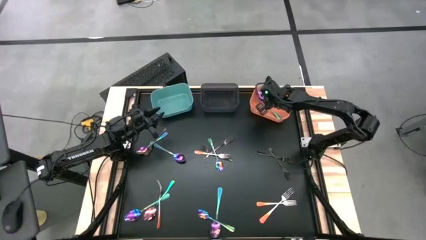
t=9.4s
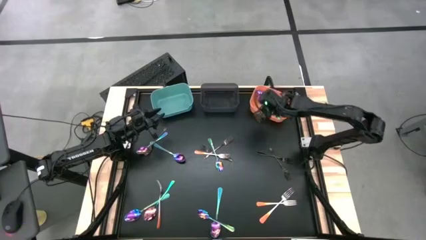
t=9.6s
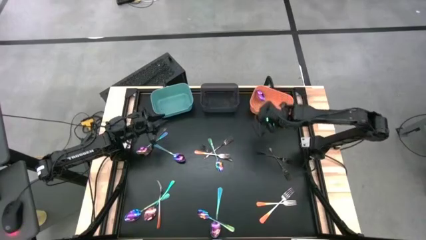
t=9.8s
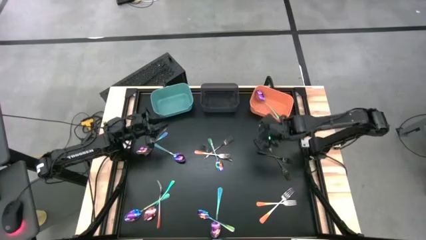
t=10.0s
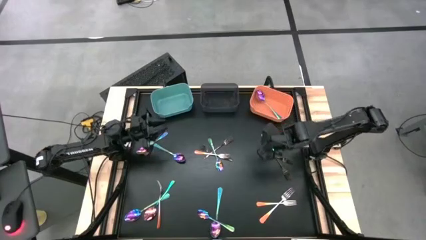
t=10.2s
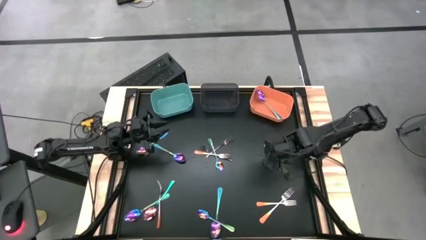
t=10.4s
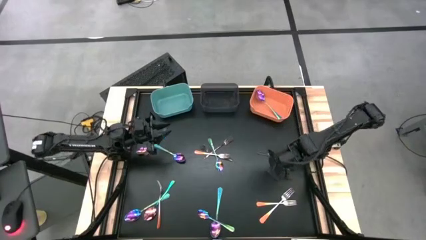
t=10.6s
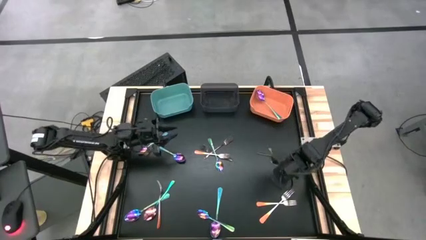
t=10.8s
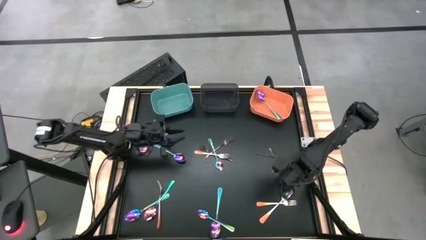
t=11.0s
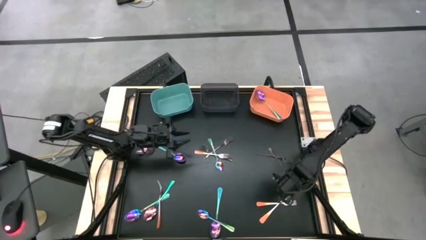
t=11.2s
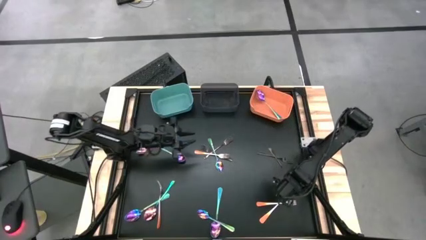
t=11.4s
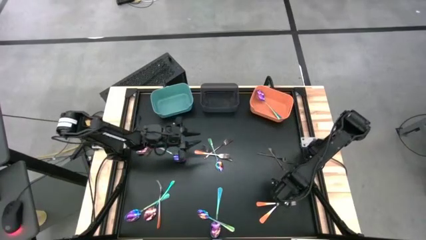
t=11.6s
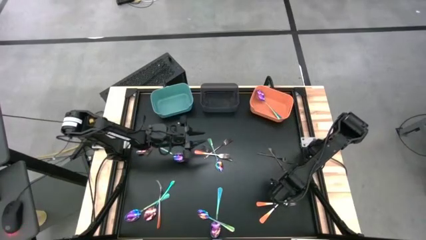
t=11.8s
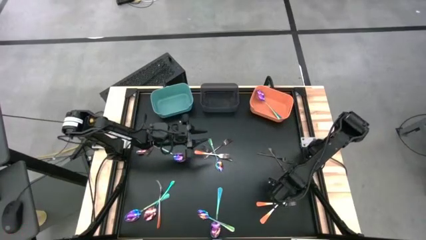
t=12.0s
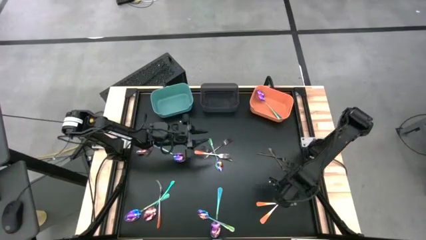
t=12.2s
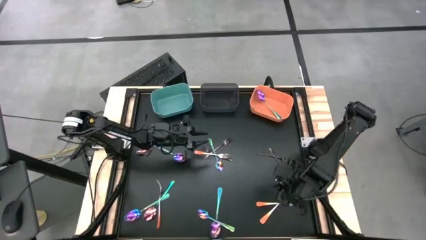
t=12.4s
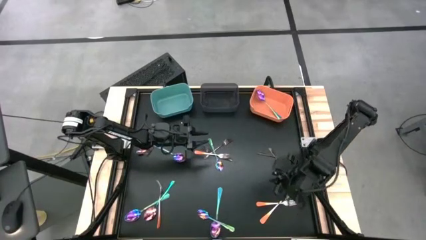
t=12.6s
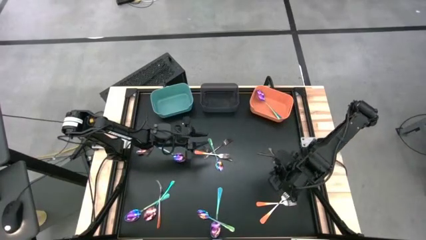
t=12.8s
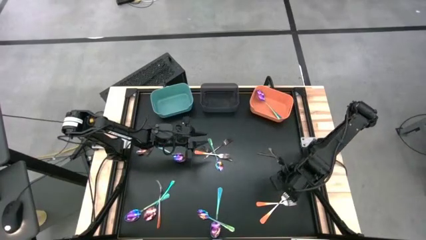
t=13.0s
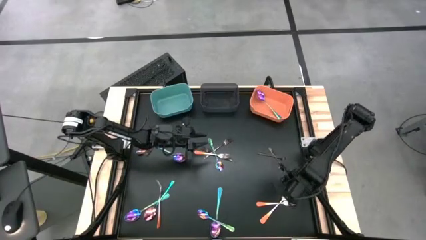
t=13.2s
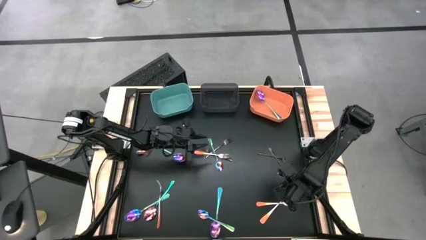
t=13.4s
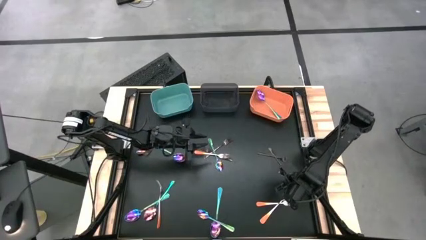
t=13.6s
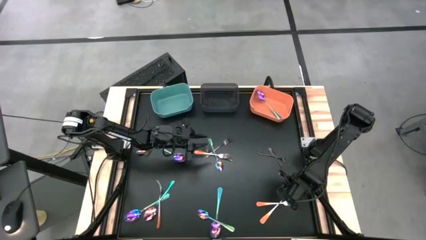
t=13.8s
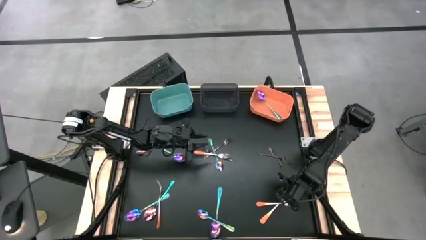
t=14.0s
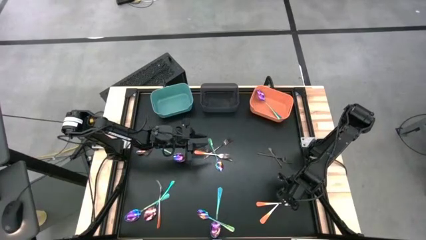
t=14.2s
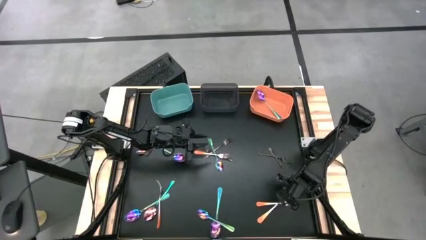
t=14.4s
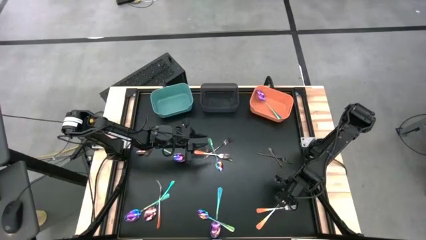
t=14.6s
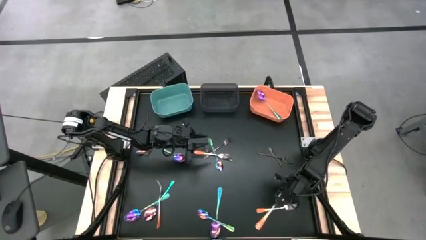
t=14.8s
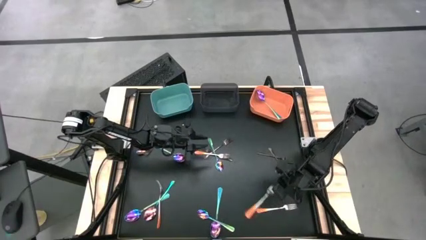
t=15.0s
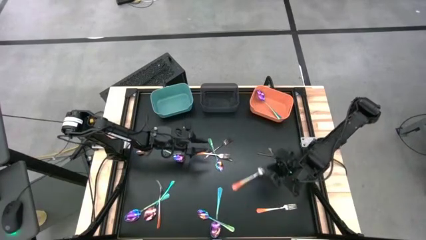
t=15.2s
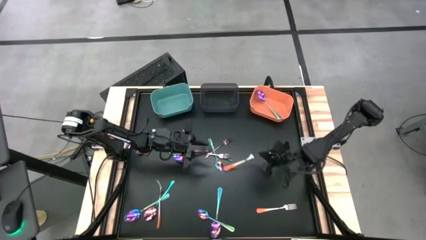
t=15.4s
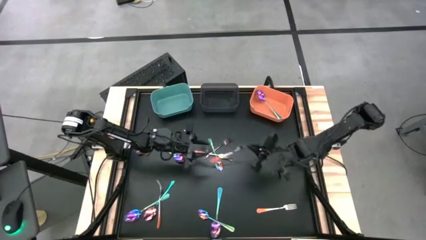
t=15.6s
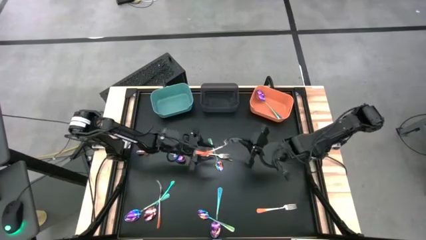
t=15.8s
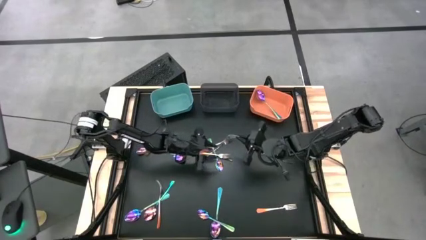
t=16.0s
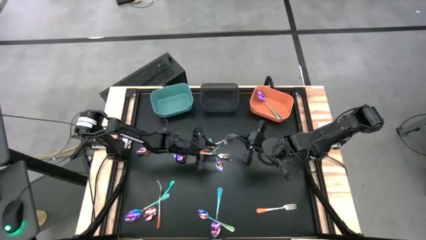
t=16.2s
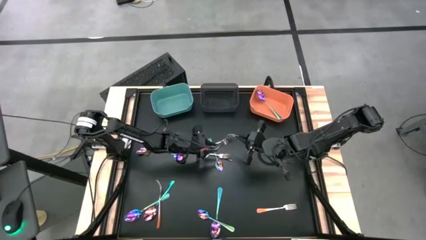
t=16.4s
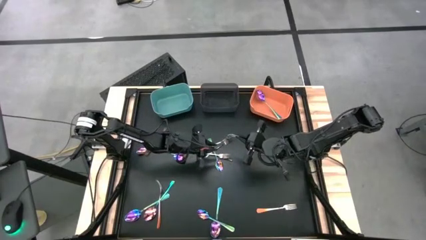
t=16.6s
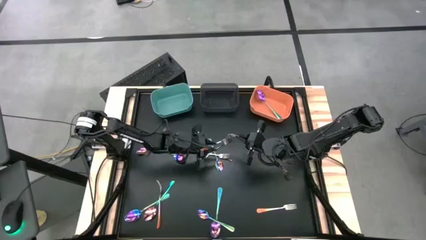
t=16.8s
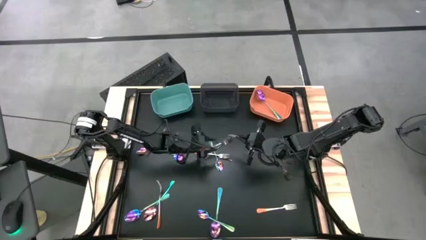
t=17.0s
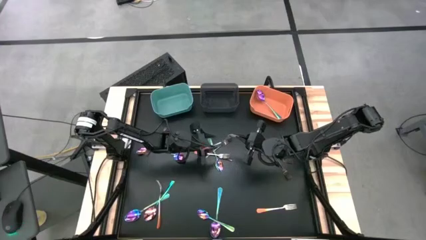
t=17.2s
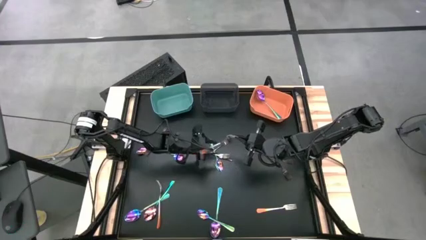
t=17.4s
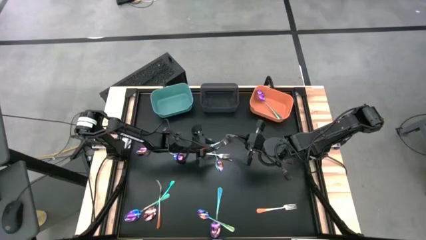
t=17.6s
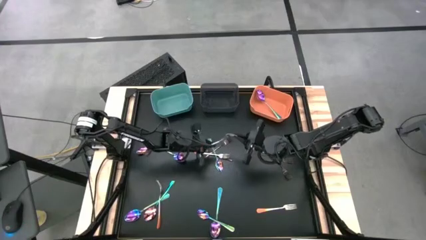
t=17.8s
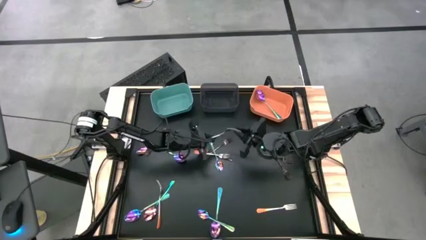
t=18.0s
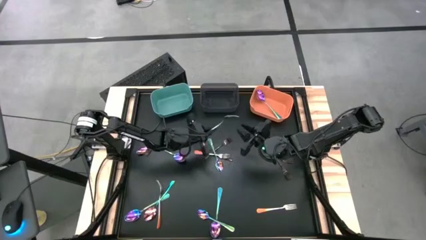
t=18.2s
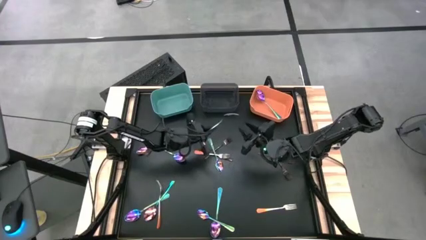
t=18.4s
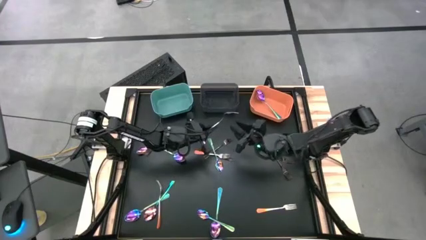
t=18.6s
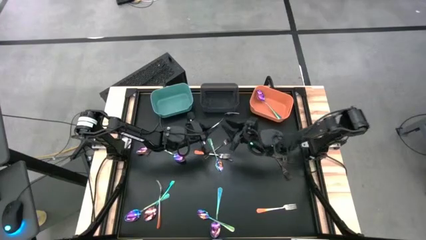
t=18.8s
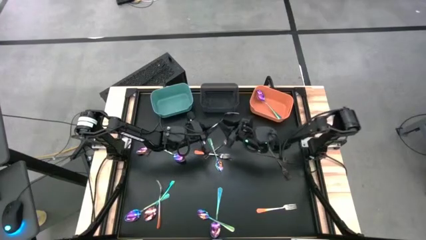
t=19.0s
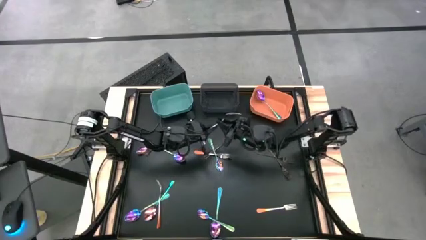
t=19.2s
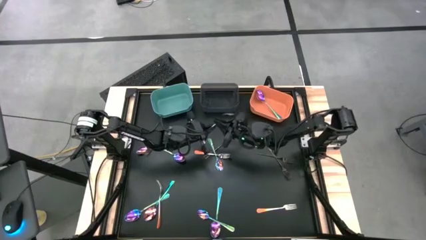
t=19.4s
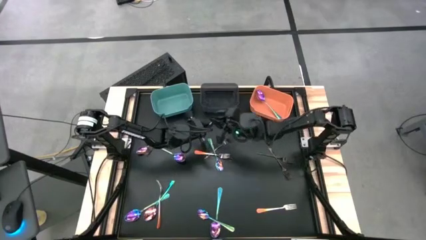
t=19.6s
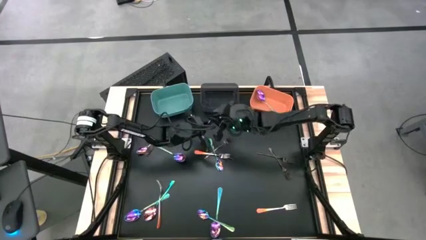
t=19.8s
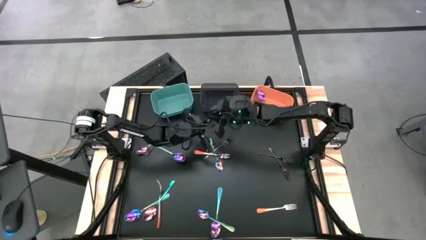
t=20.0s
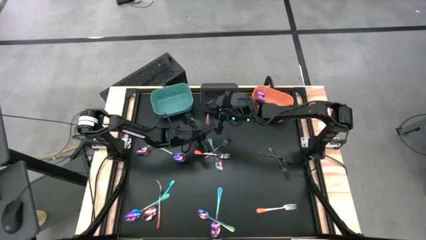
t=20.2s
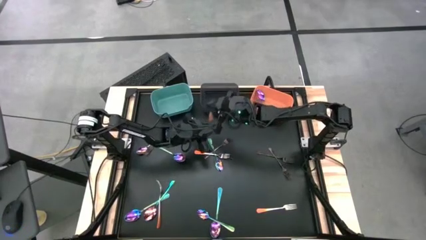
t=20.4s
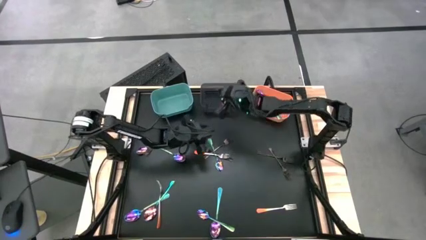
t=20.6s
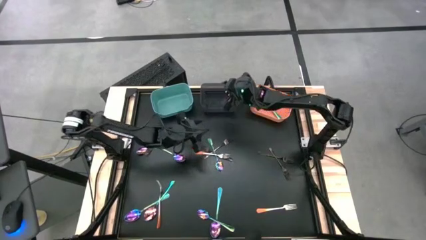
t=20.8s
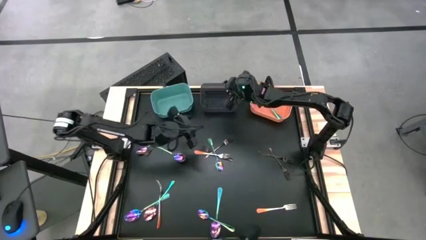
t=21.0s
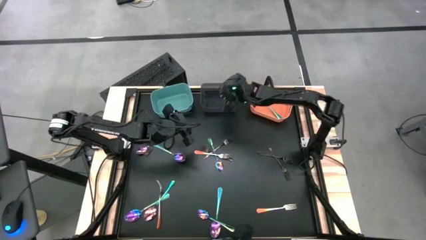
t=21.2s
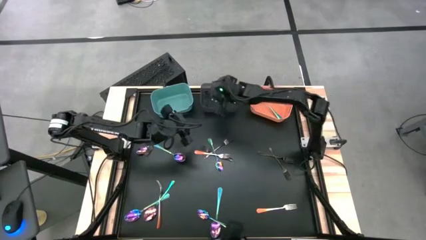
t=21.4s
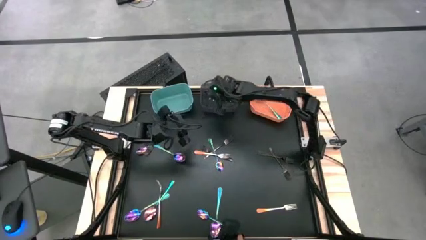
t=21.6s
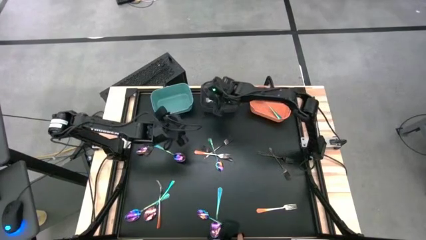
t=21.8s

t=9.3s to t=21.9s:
Task: Sort silverware by color (type)
Put the orange fork into the black bin

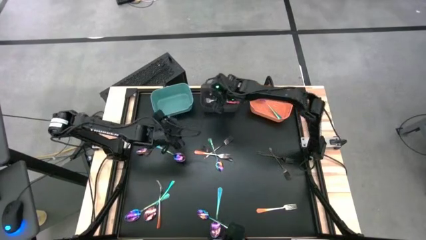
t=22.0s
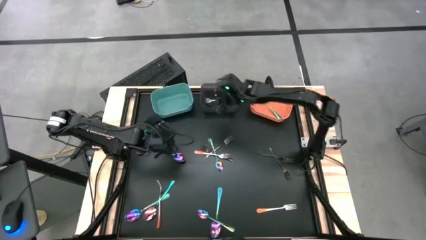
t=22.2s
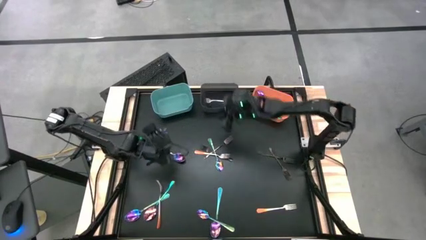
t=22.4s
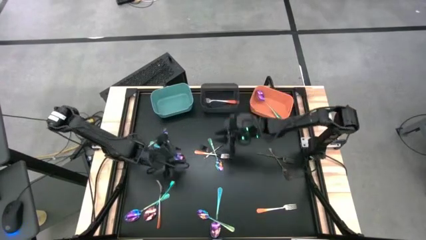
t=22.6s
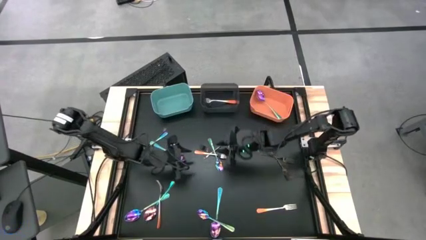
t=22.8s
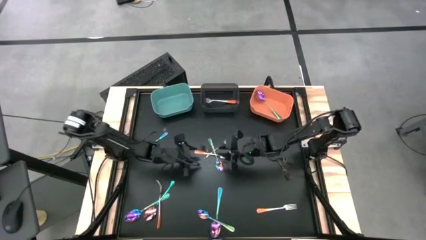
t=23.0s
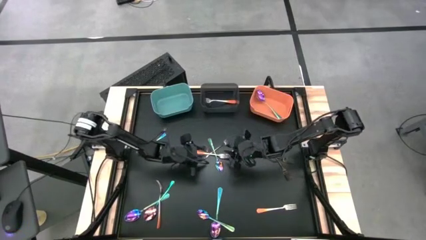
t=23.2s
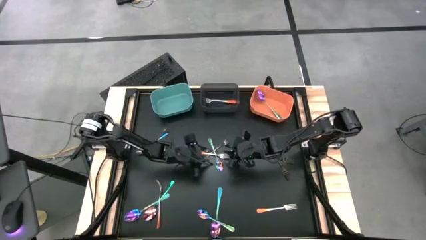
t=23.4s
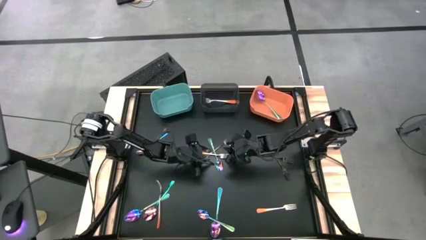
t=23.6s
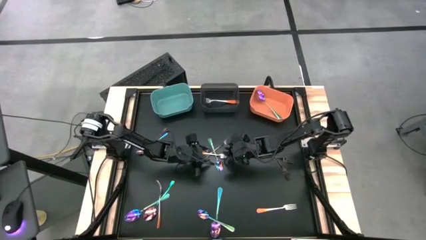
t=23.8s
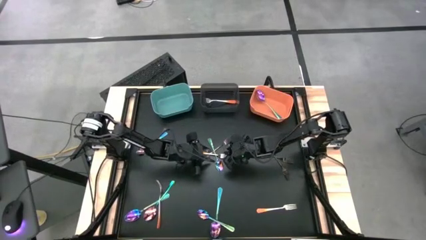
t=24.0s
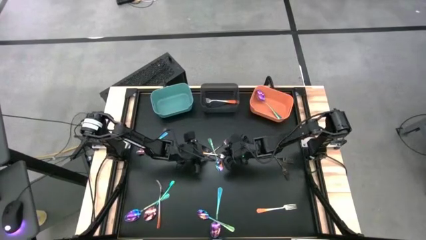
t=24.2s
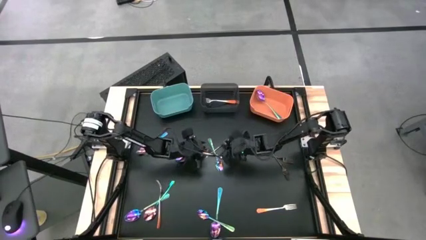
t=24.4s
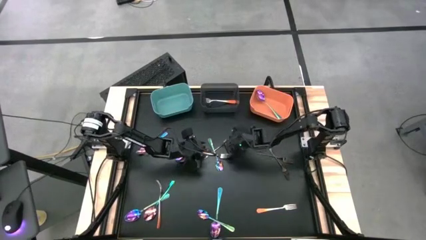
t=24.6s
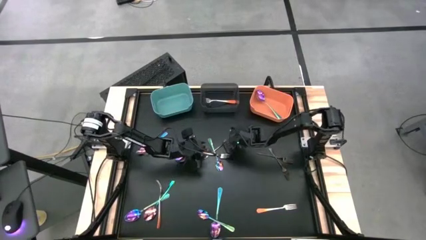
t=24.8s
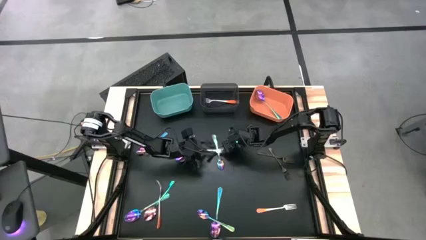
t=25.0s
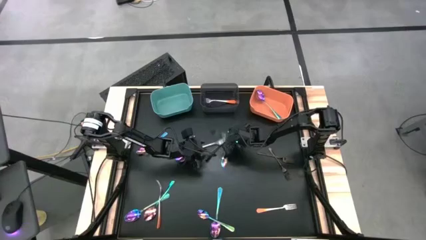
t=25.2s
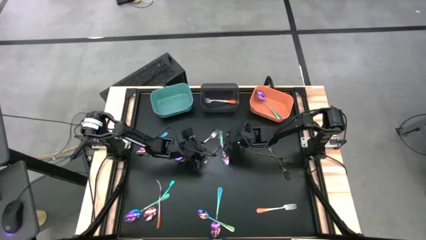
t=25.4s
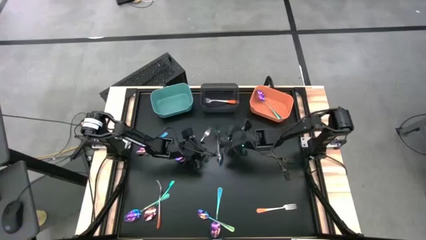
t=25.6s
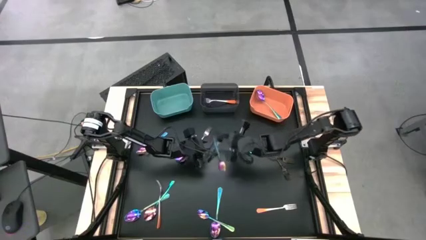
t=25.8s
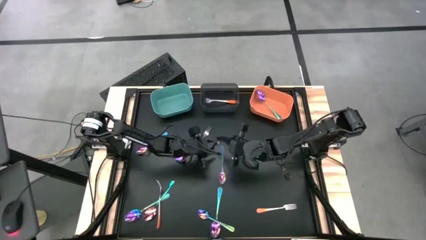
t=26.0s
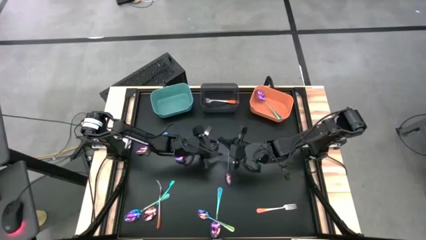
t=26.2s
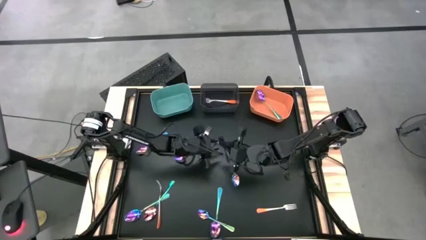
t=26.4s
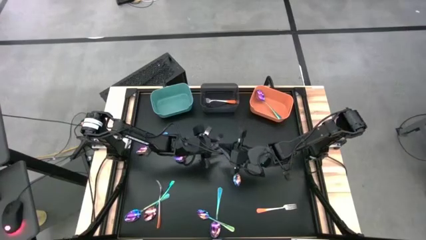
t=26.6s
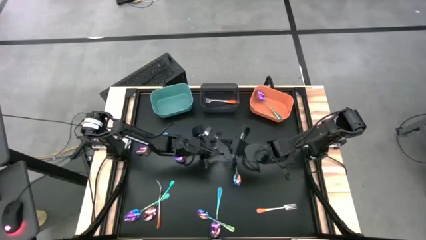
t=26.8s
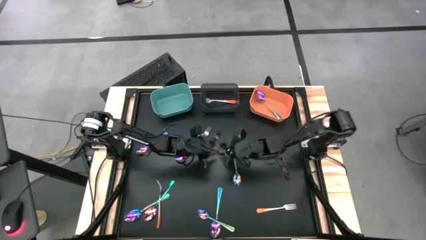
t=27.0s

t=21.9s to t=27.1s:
Put the black fork into the green bin
